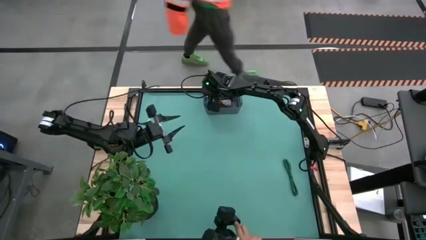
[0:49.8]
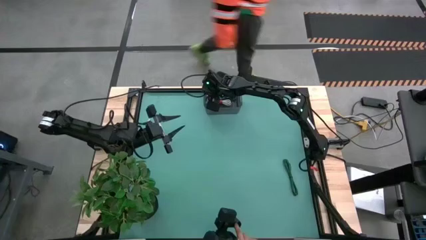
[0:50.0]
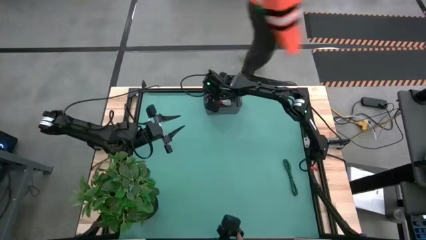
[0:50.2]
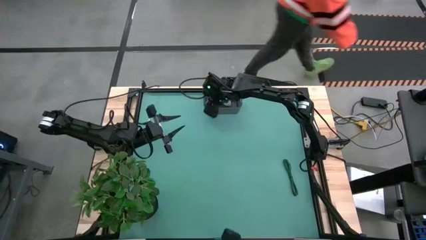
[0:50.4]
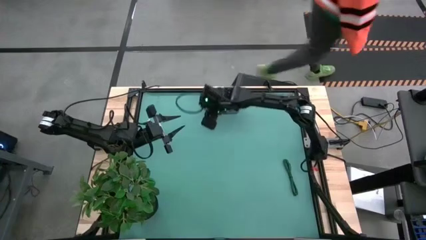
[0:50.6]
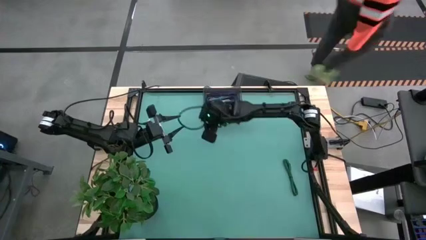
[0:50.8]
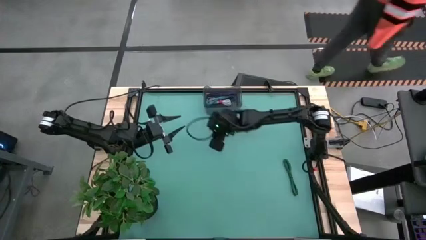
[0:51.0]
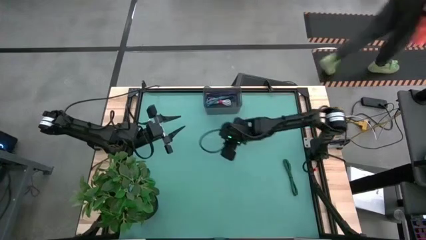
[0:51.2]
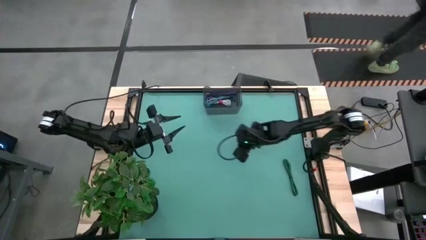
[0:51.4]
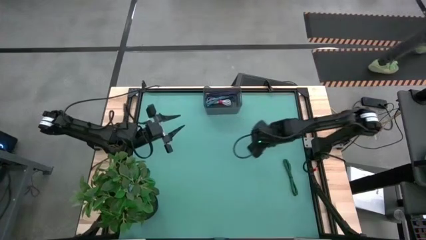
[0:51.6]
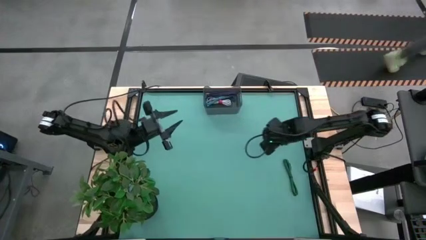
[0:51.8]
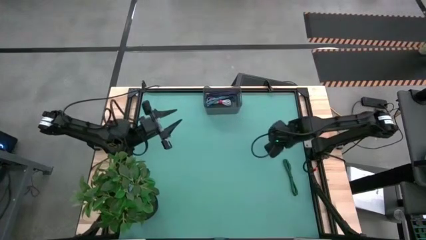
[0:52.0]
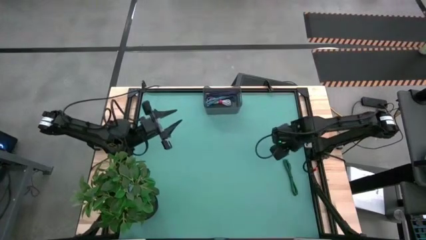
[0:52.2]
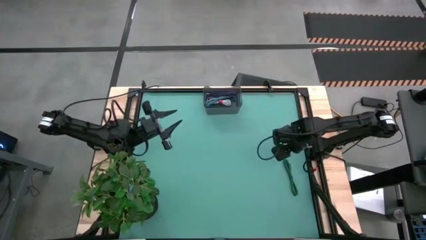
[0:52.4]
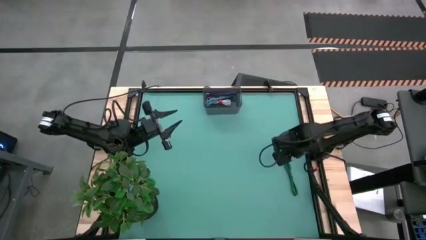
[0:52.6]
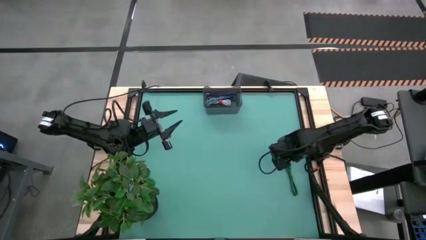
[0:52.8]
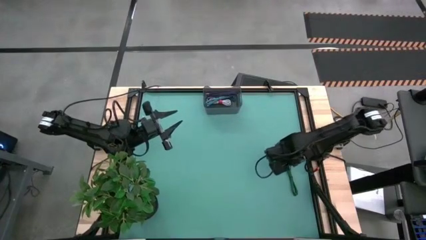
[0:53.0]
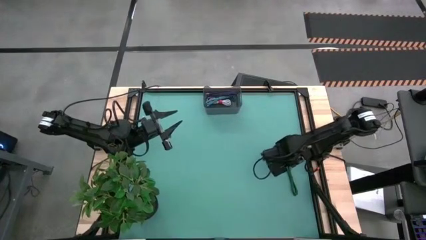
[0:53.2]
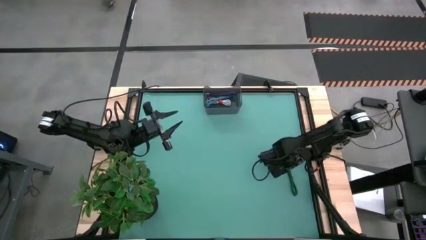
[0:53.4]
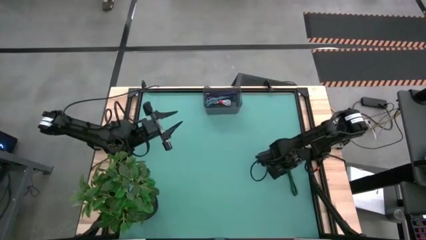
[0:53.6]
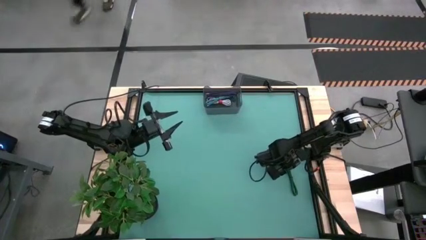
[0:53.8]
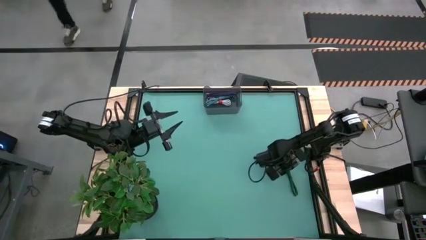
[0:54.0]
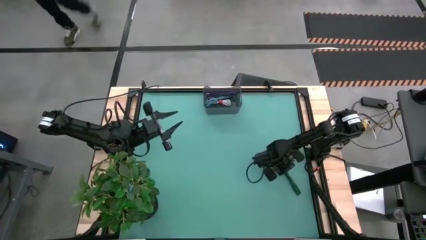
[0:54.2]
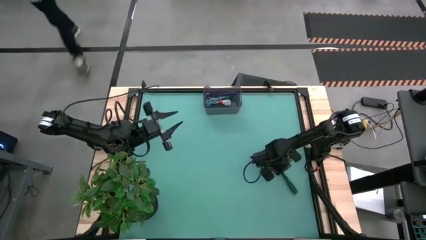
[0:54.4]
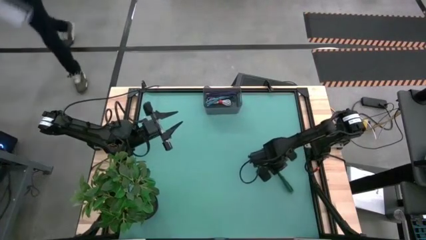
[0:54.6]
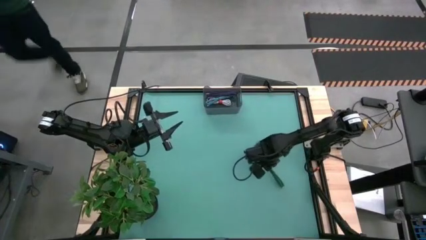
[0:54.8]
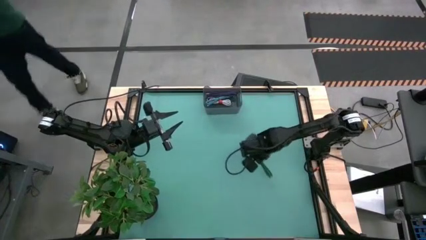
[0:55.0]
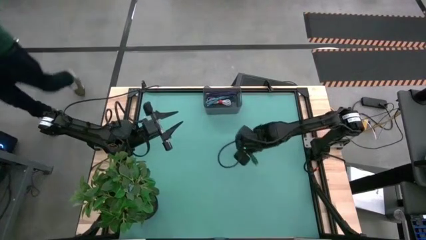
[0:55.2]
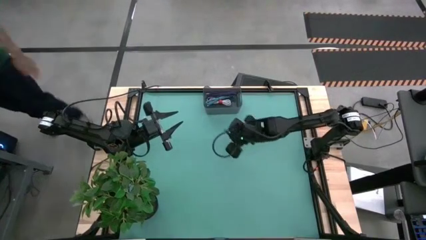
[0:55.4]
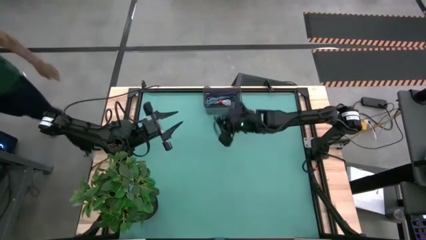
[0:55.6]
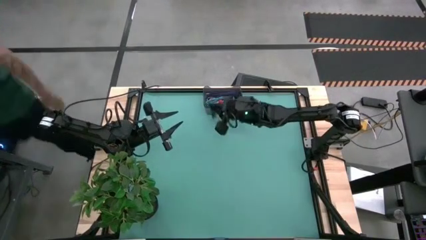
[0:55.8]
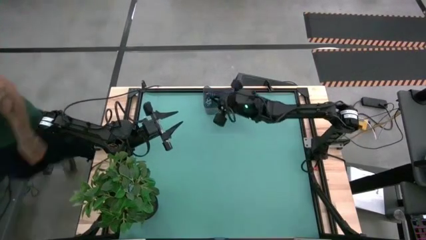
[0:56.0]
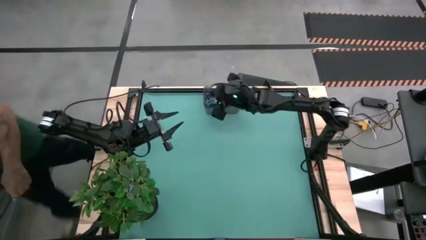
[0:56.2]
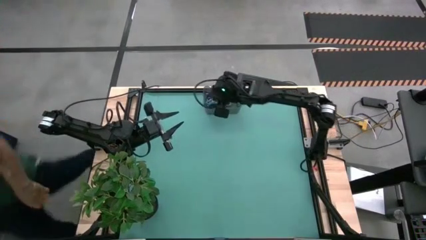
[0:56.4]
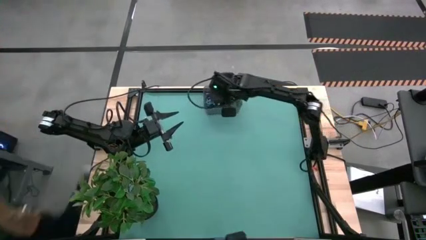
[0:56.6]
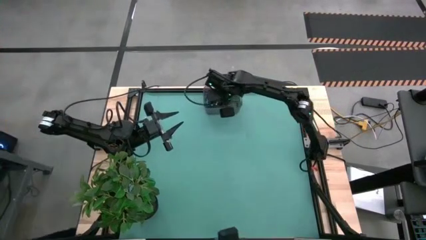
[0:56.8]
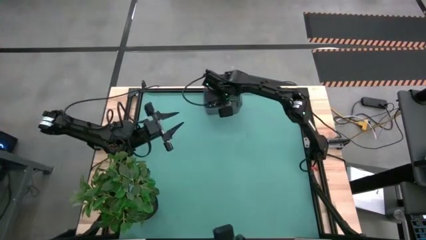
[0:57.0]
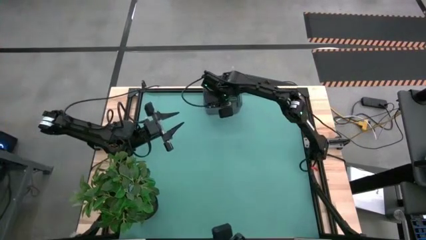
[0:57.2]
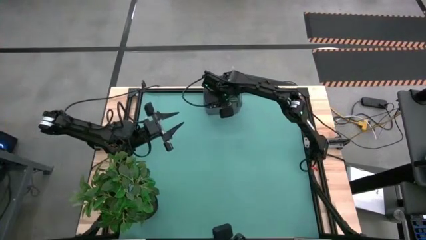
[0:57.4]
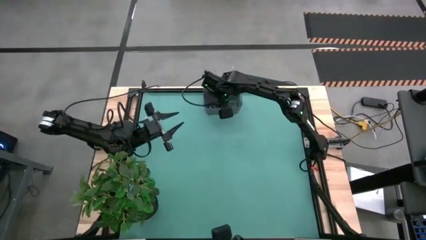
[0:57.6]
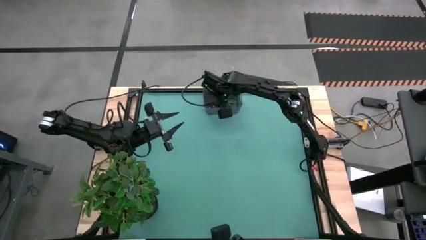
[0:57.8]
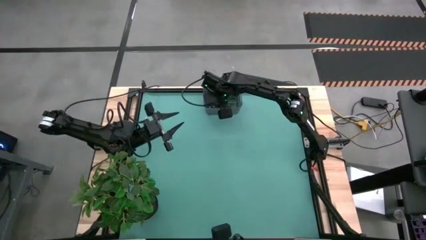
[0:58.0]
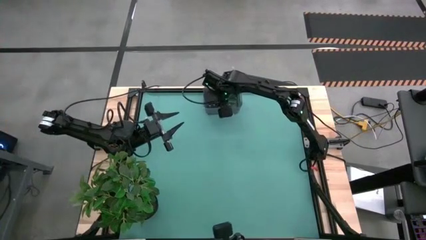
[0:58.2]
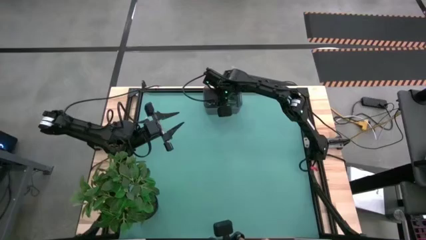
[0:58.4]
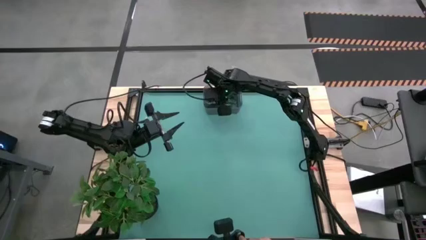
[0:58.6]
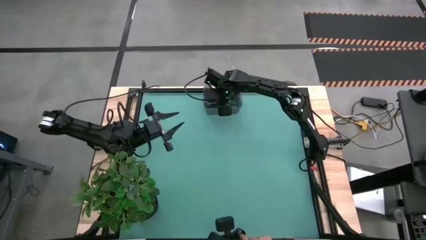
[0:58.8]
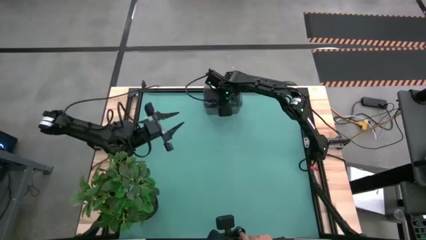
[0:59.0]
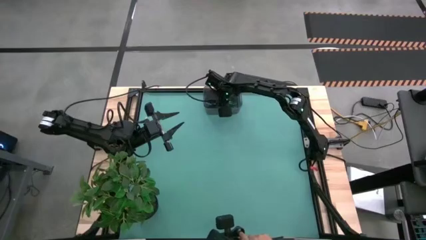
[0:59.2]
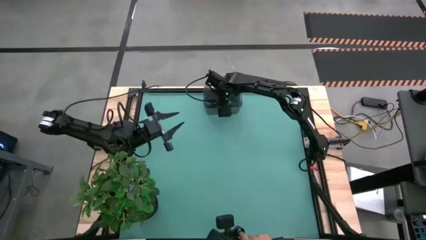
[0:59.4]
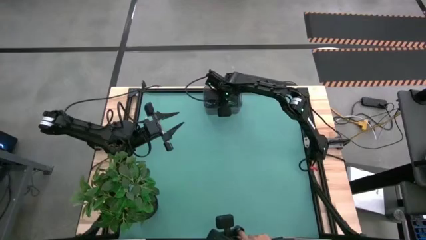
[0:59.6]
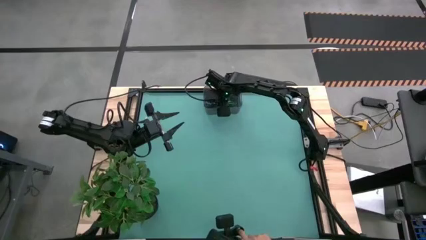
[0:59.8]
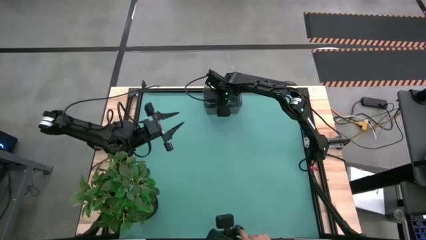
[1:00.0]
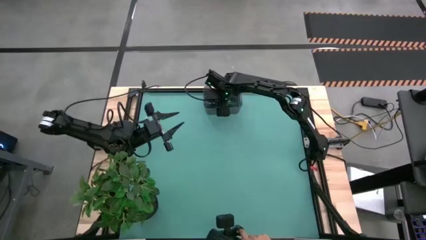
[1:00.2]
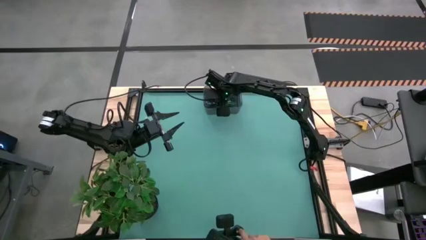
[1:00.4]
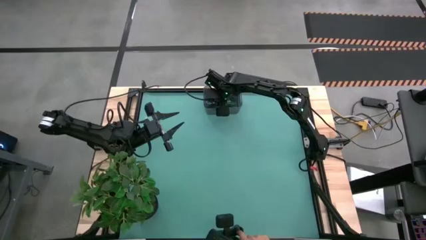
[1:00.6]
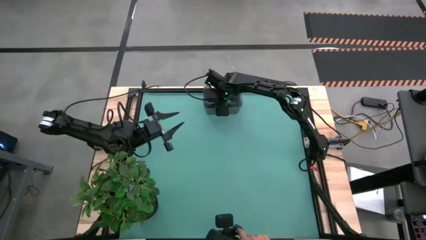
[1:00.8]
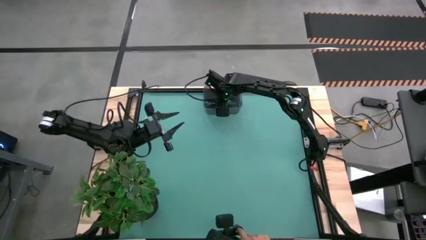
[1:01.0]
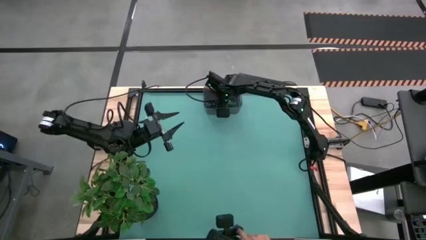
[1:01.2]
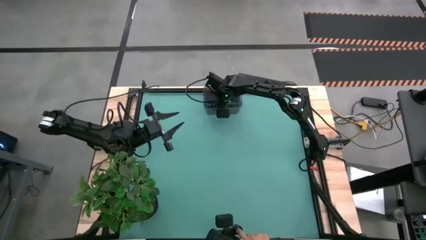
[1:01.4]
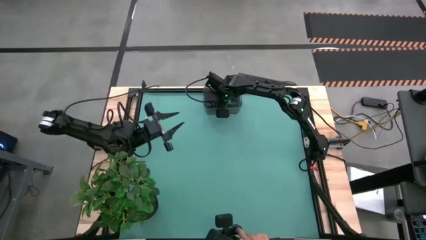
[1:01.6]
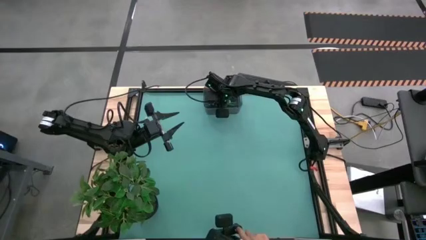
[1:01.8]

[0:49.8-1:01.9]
Task: Pick and place USB-C Cables
Put the green charger cable into the black container

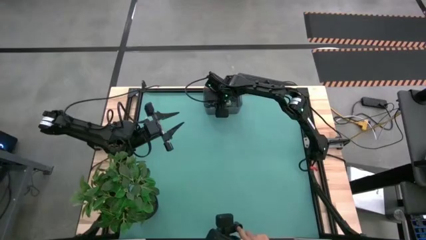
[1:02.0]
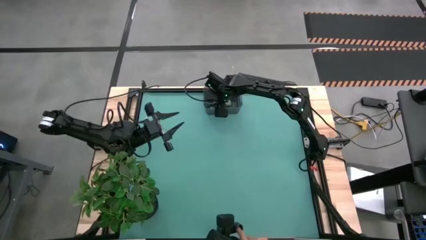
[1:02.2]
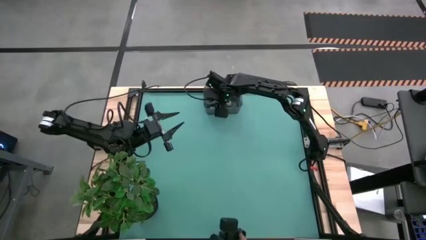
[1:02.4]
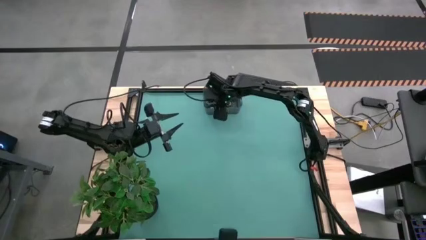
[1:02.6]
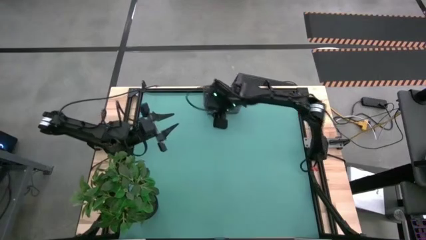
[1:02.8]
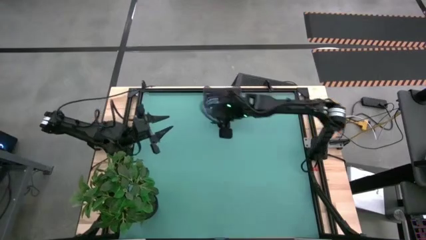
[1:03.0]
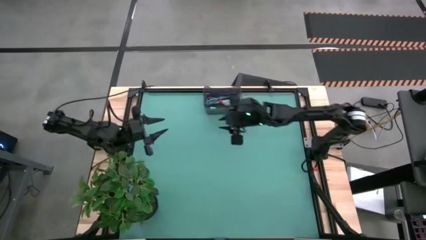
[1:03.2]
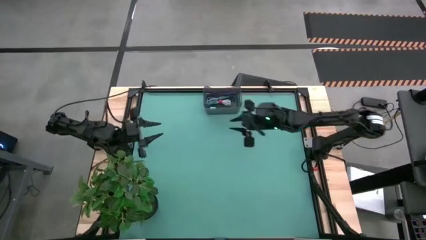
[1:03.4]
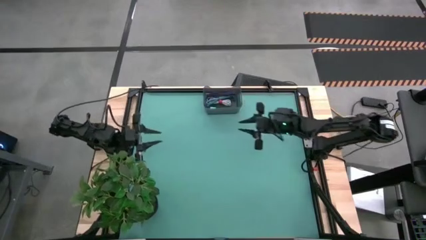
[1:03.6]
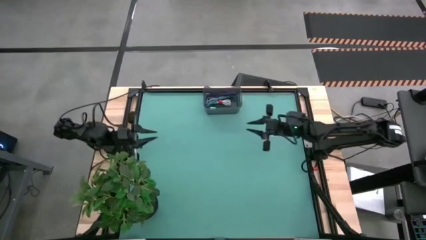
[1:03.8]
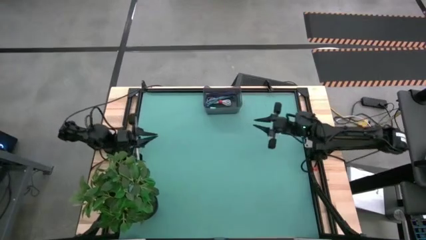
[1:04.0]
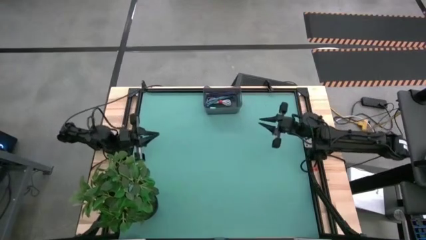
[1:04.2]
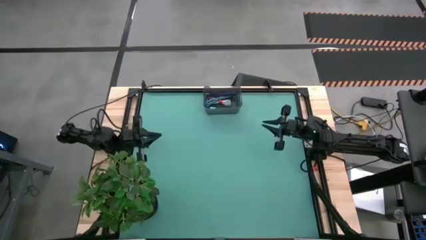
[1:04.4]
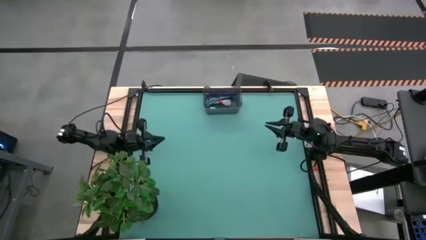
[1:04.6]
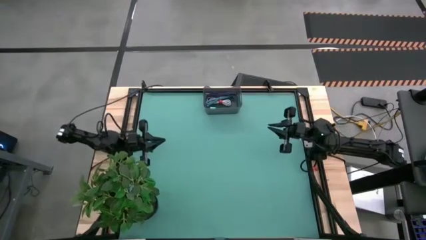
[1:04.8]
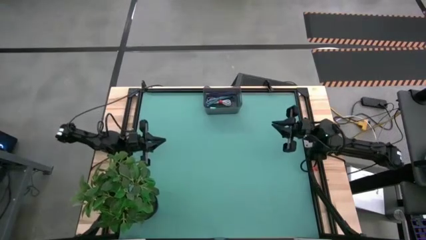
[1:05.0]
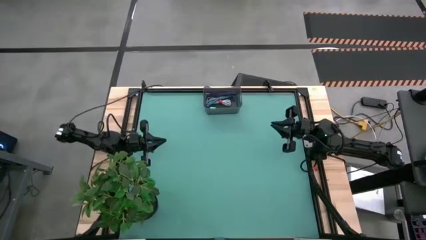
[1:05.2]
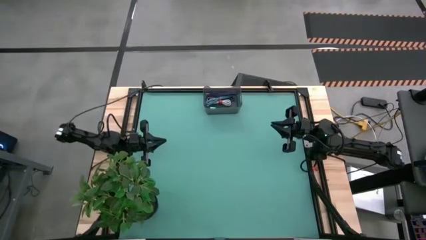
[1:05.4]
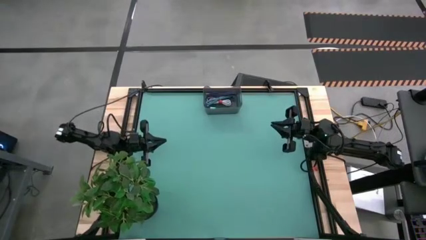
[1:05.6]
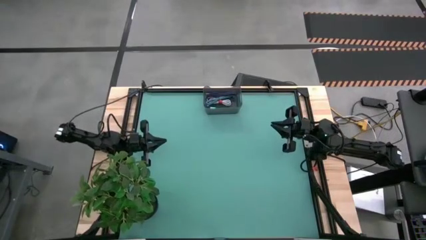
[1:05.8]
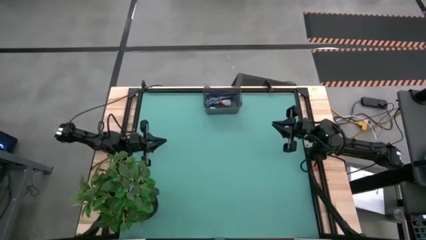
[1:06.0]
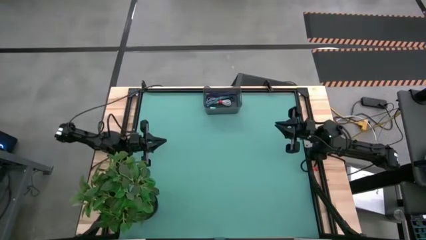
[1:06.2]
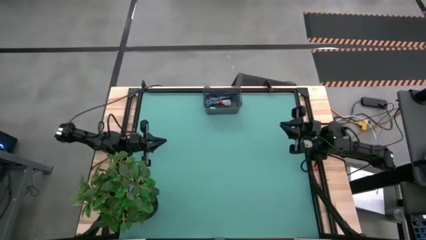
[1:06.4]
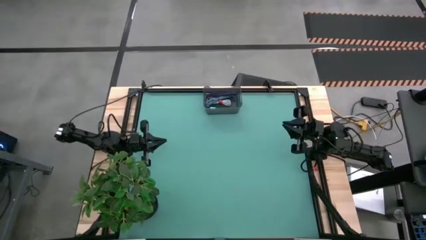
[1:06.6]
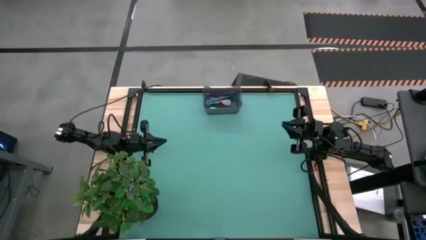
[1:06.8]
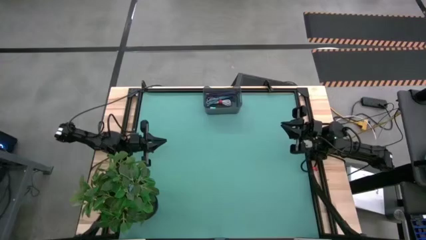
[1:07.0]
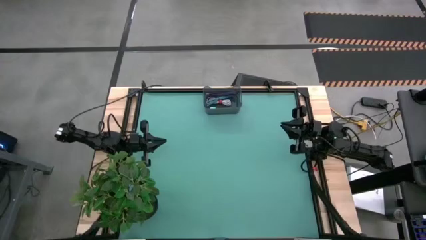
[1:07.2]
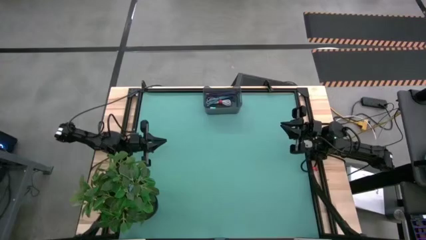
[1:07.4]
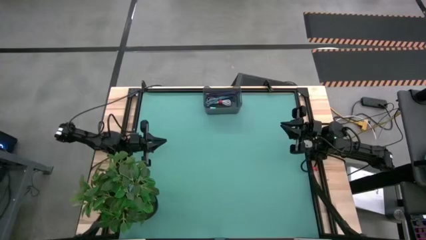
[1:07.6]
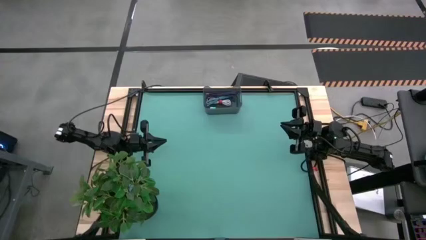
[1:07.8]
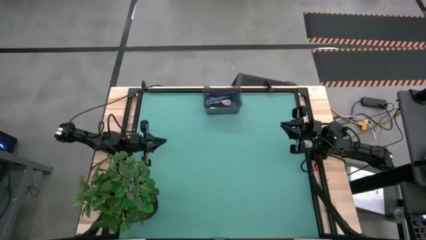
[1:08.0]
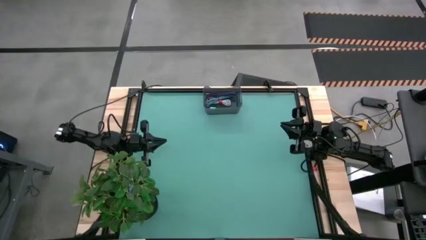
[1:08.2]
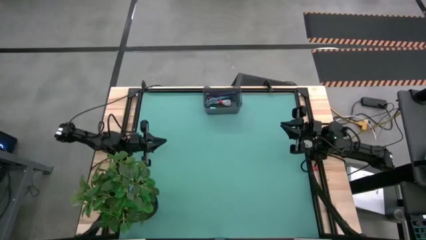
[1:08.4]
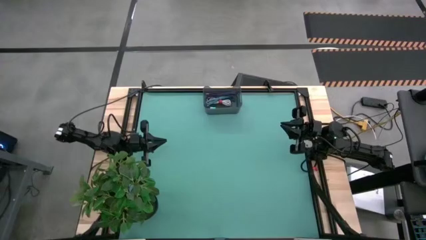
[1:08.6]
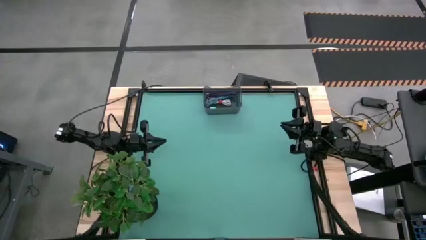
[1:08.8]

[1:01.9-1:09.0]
Return to Home Position
